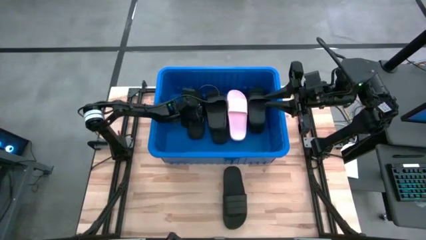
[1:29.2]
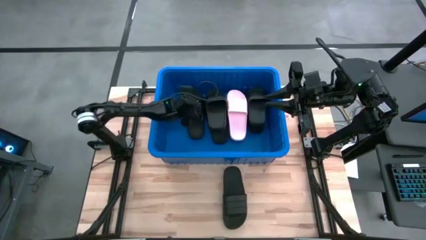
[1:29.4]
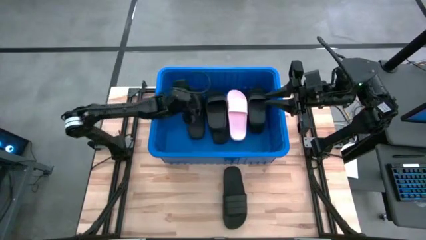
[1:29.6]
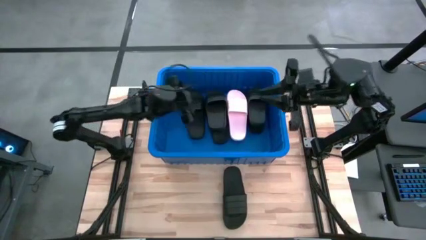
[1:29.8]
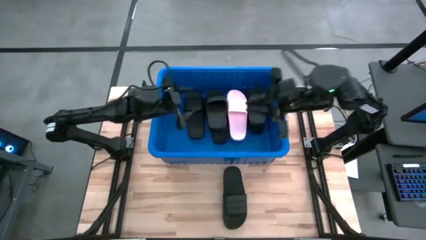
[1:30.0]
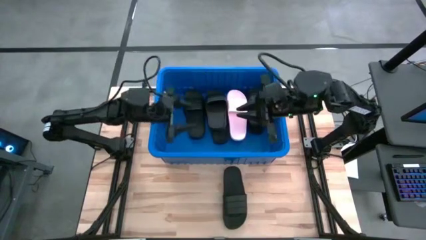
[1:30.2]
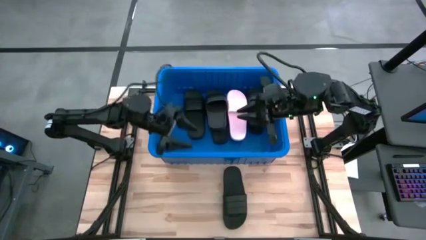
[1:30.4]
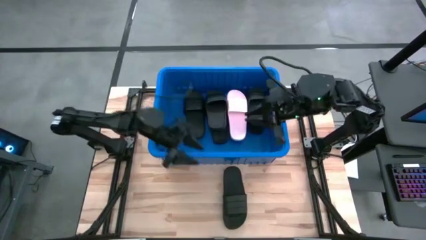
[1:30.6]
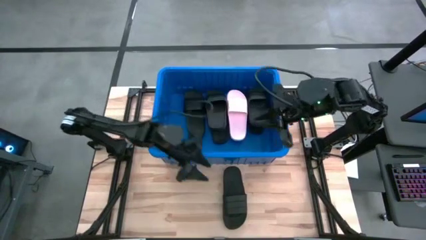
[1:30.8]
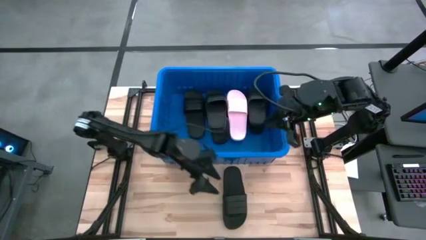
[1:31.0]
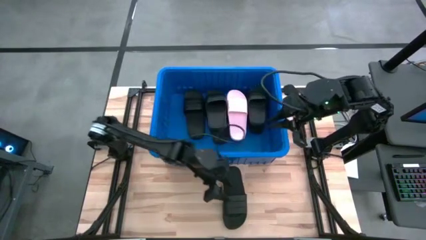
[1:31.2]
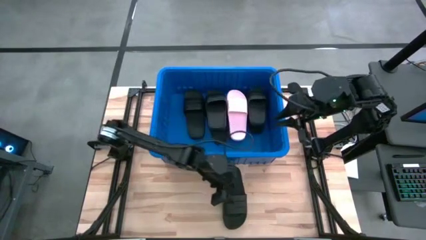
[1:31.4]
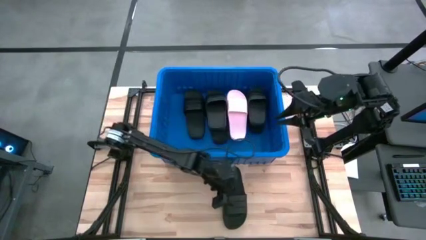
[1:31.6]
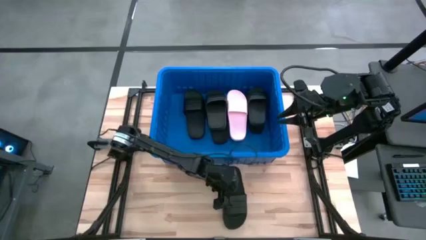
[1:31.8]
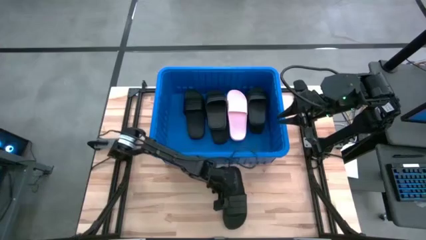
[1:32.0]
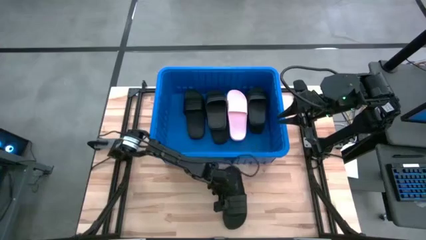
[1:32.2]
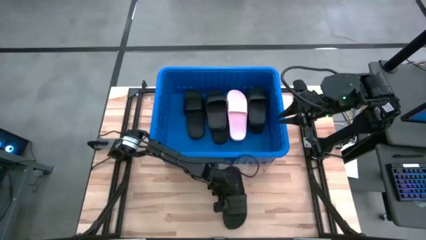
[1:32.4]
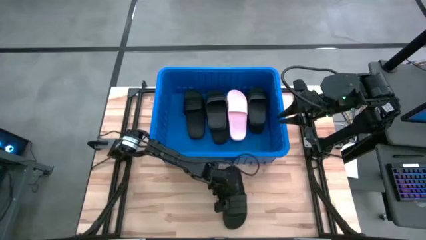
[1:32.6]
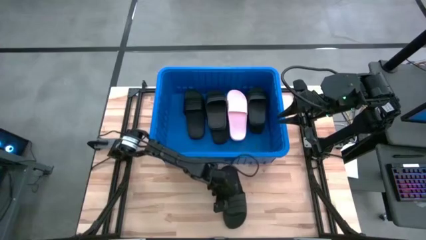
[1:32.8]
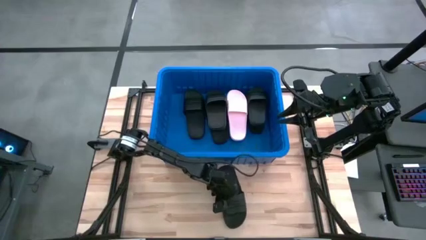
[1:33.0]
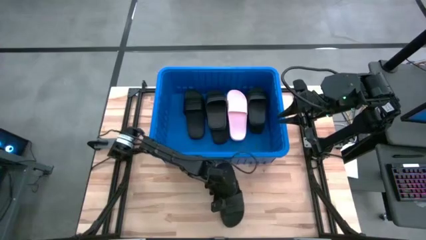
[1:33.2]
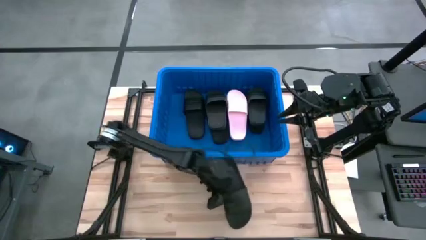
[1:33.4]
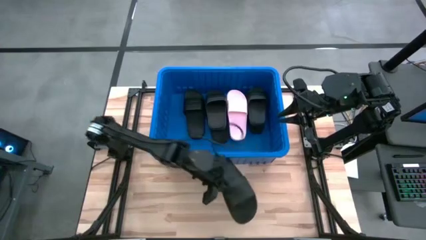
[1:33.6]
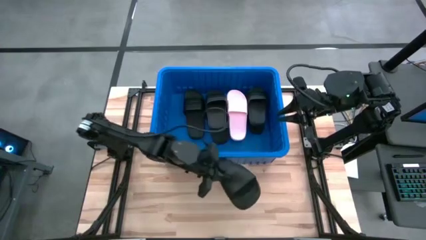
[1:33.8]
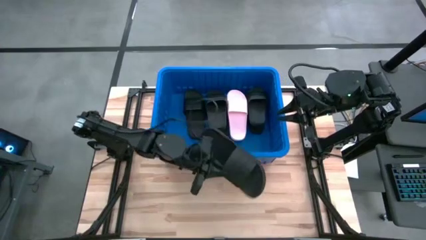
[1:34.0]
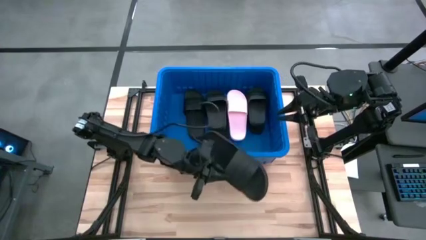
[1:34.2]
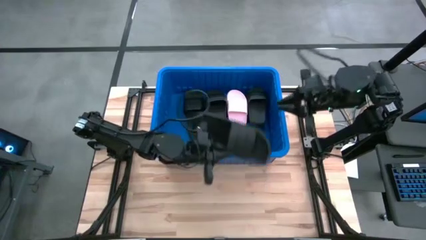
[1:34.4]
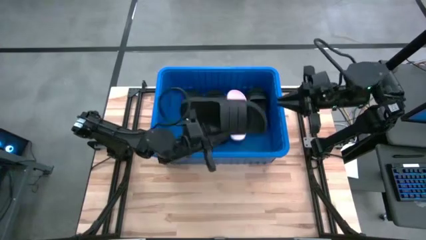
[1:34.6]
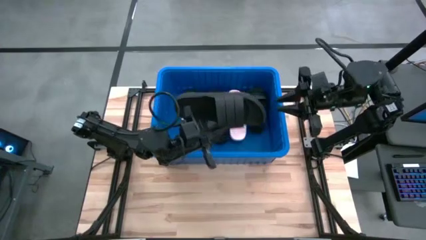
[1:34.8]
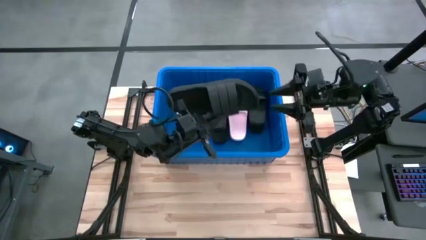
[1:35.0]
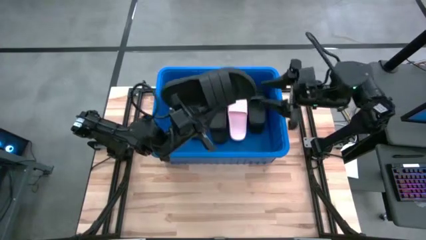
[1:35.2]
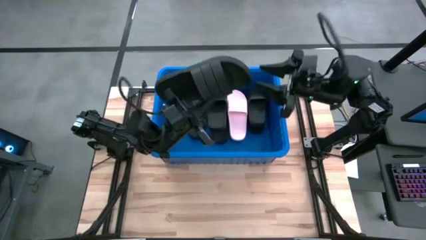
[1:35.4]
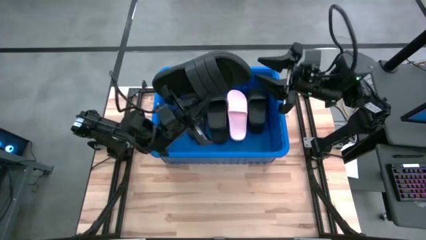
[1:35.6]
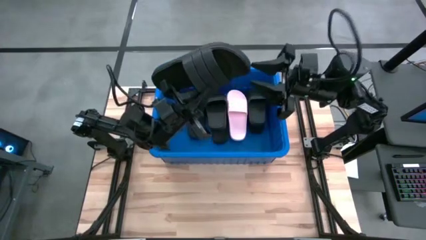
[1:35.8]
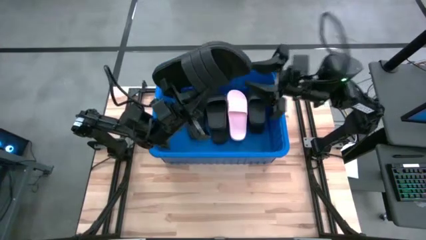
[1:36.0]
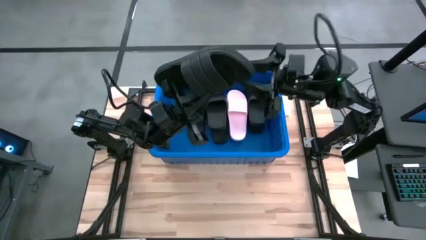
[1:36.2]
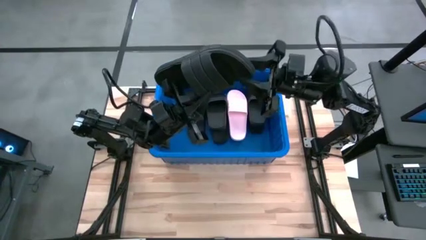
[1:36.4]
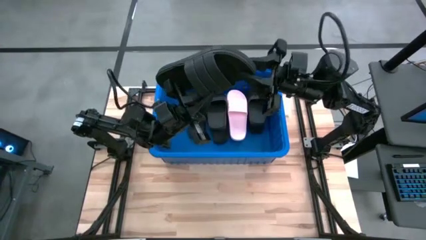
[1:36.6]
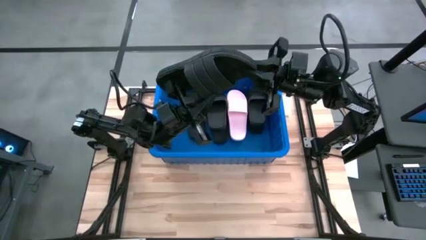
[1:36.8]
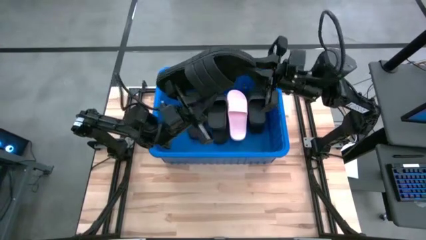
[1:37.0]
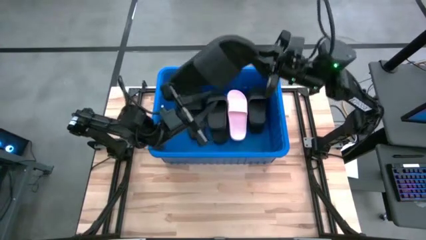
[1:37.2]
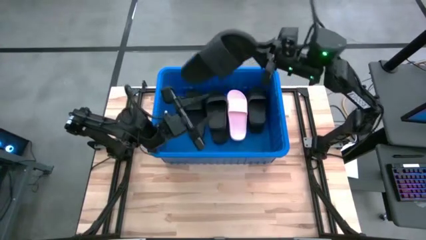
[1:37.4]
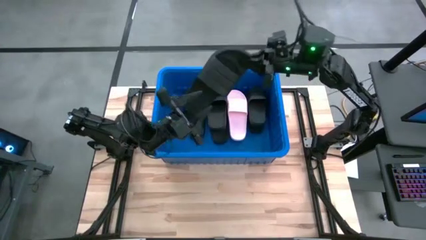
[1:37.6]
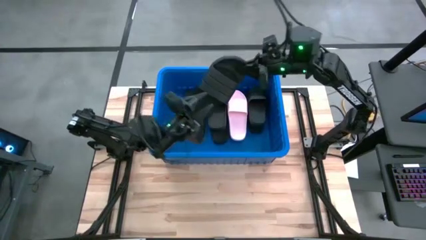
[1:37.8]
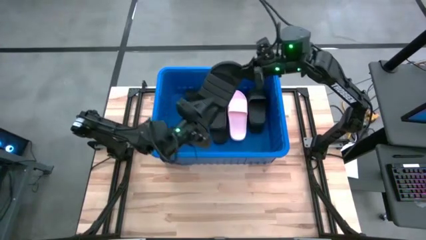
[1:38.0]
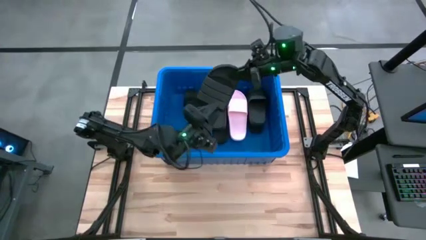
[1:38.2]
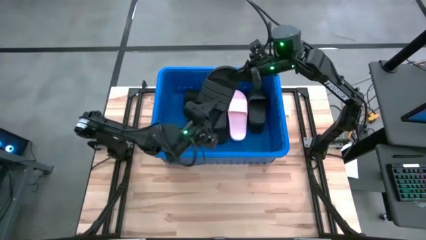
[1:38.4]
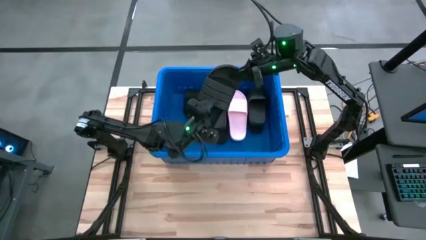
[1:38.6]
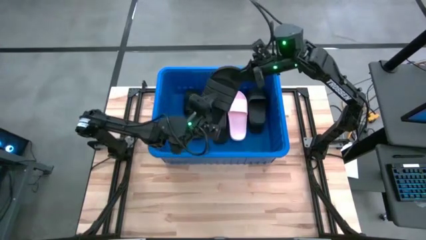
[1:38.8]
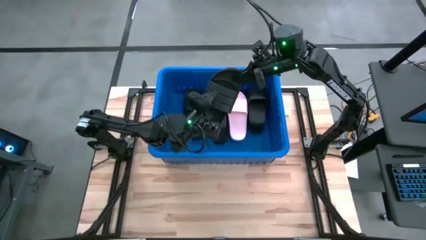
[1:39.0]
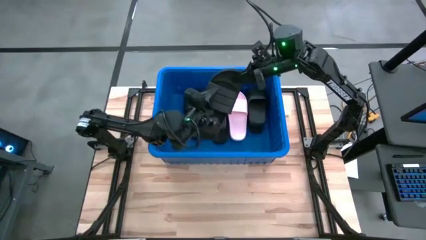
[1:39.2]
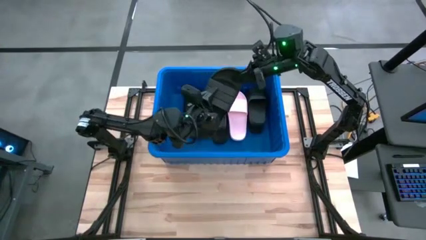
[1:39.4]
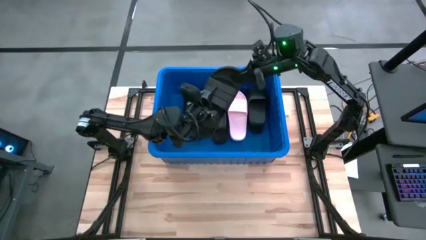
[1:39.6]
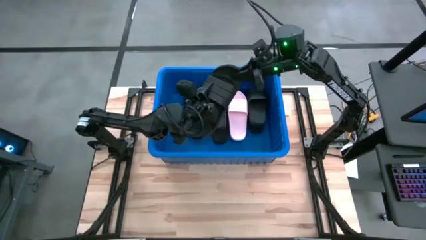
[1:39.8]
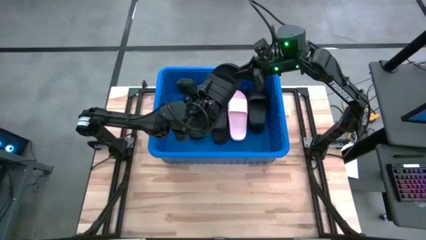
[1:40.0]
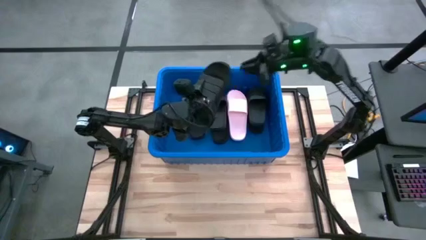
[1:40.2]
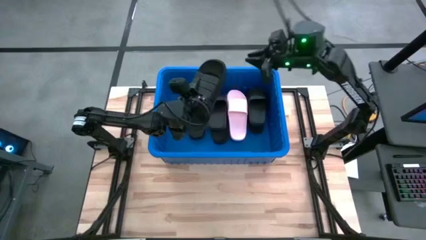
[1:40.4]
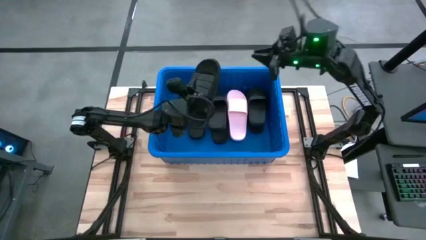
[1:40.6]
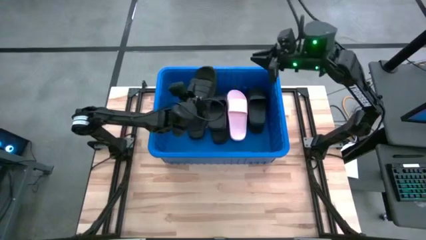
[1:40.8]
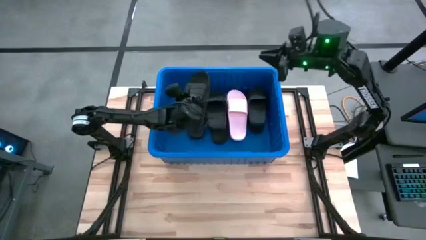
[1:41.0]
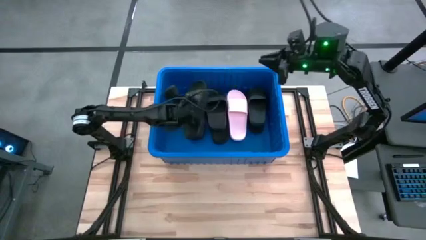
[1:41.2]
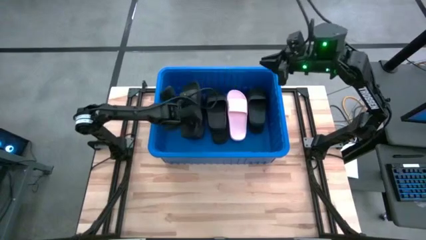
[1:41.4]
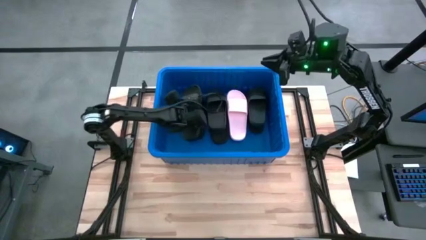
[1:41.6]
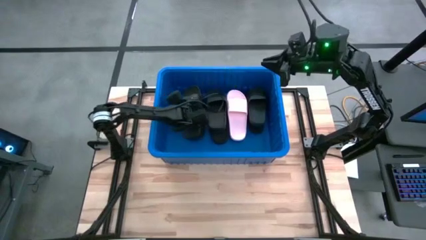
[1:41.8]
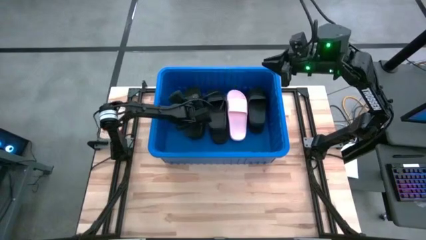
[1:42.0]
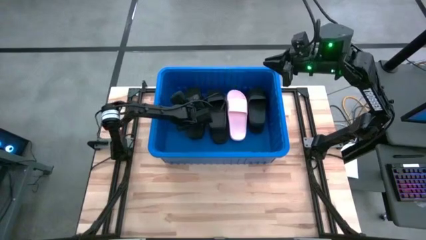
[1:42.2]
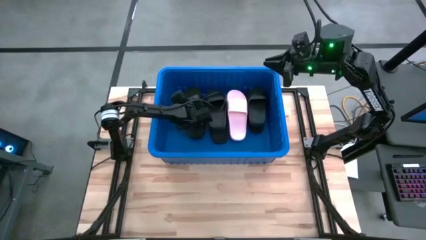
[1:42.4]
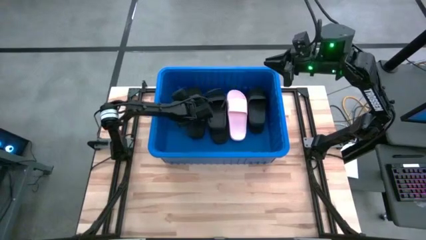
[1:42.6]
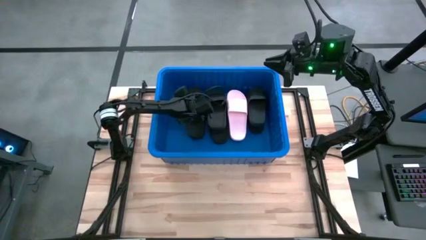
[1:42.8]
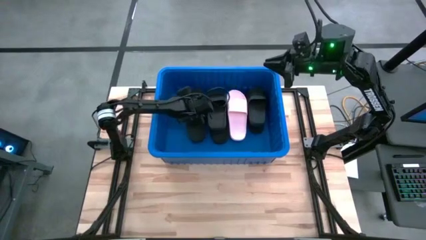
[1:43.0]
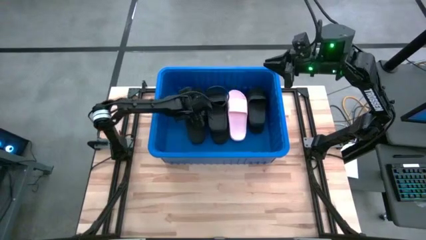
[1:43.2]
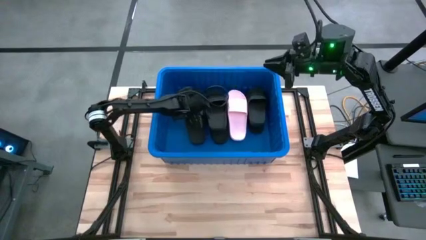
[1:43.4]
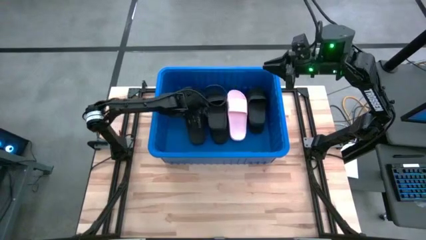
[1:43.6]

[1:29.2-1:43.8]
Task: Pick and place slides into bin
Put the black slide into the bin

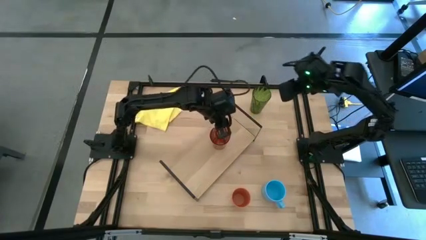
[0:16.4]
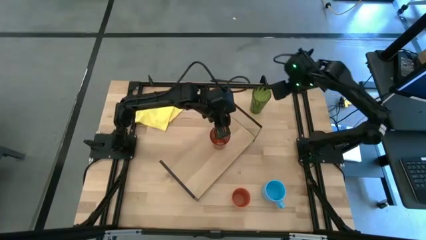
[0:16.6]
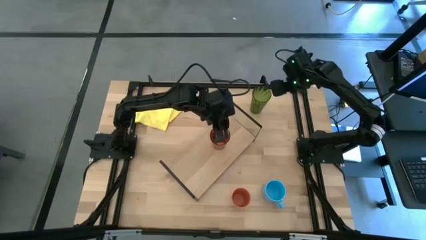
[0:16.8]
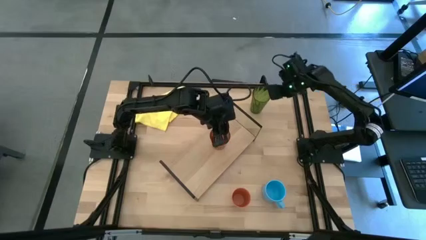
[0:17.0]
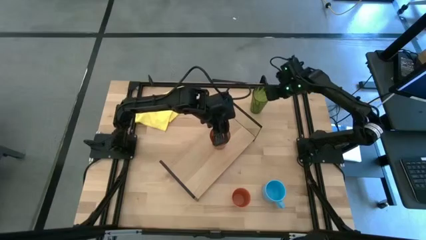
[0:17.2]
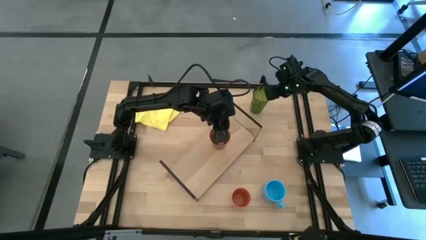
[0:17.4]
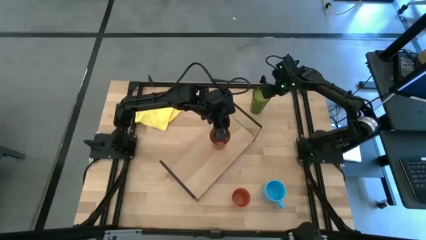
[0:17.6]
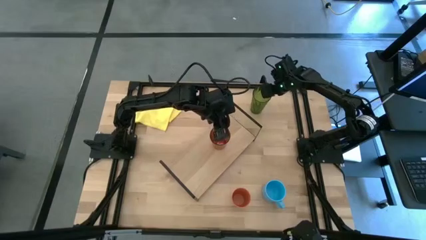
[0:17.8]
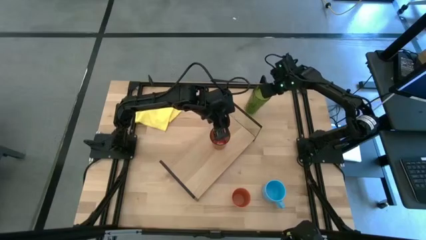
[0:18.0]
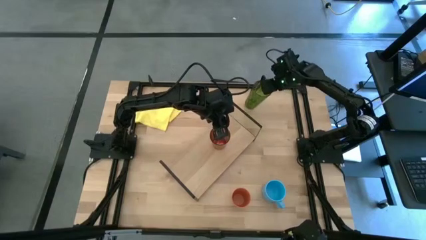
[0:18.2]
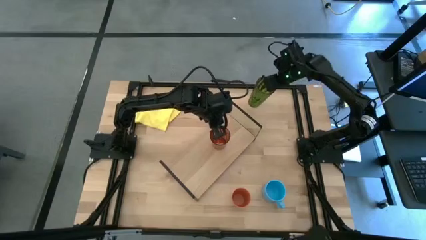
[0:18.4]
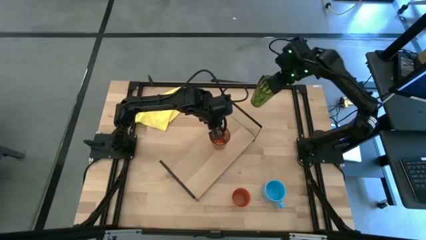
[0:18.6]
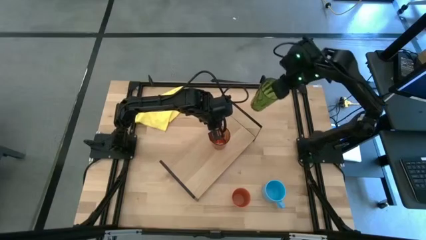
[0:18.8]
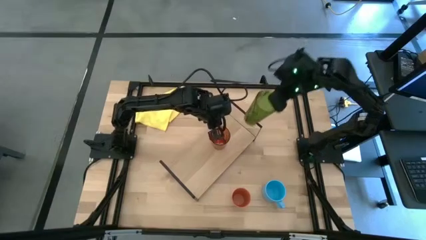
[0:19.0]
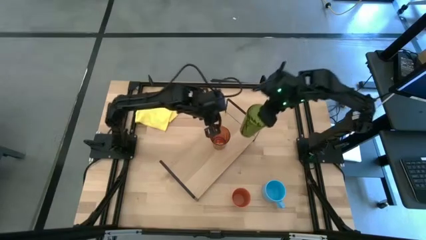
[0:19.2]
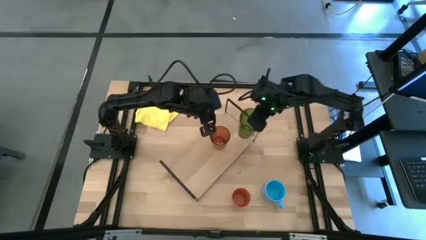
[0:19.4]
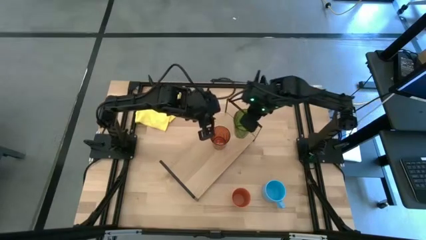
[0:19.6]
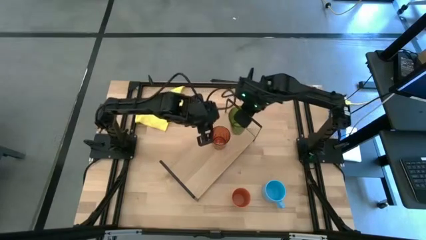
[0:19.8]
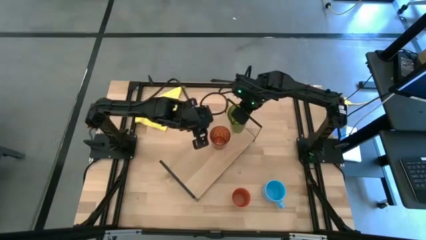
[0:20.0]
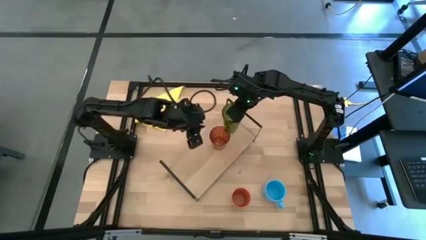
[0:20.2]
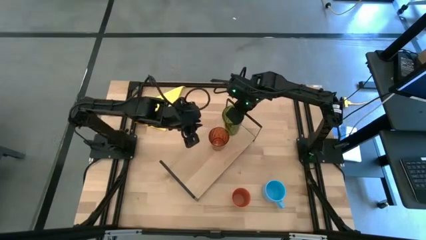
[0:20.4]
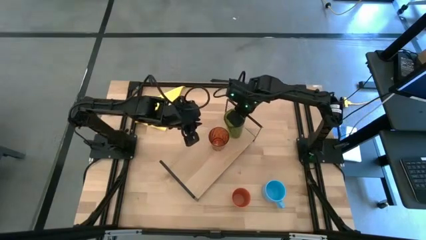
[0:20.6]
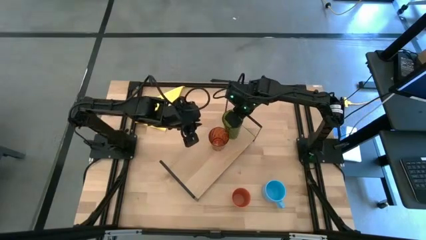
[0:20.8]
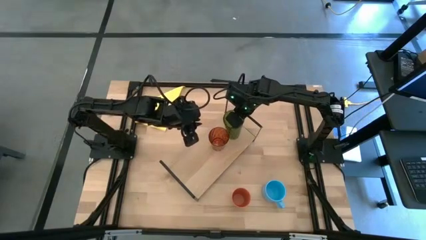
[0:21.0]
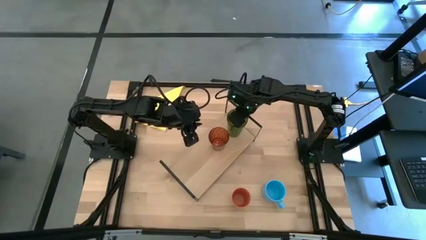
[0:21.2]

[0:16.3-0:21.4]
Task: Stack small to large cups/mugs on shelf
Put the green cup on the shelf
